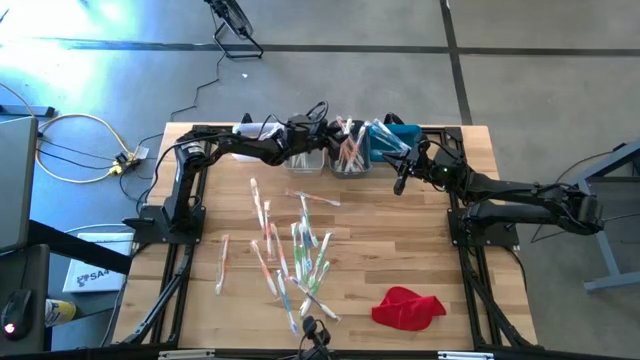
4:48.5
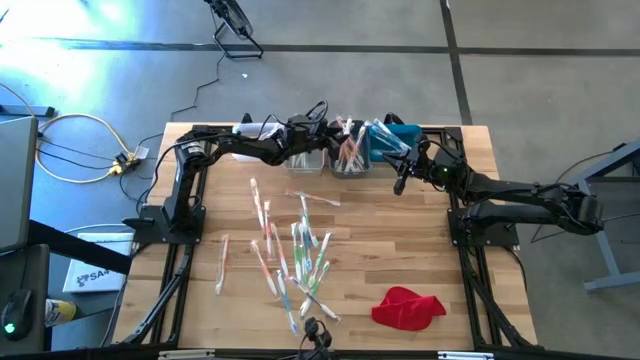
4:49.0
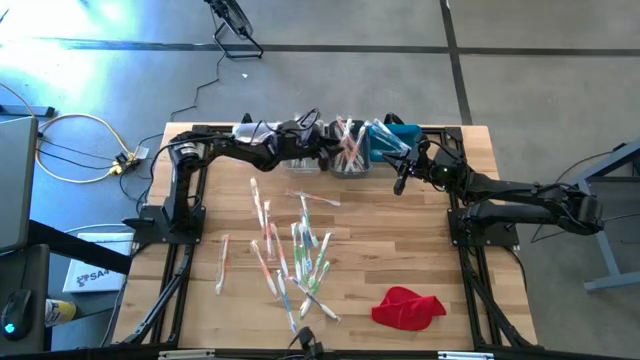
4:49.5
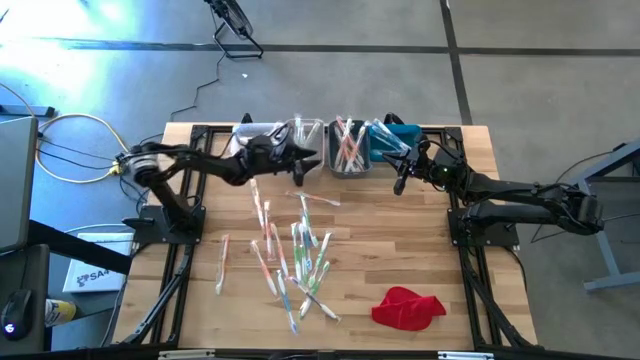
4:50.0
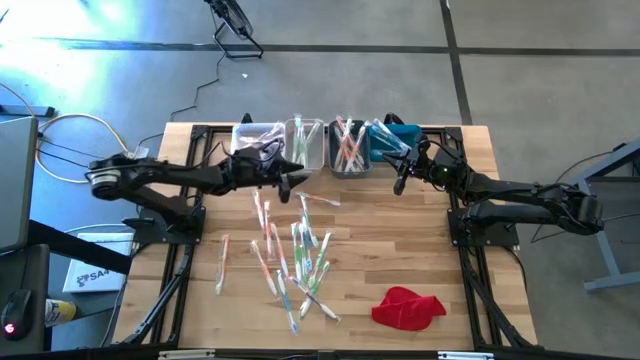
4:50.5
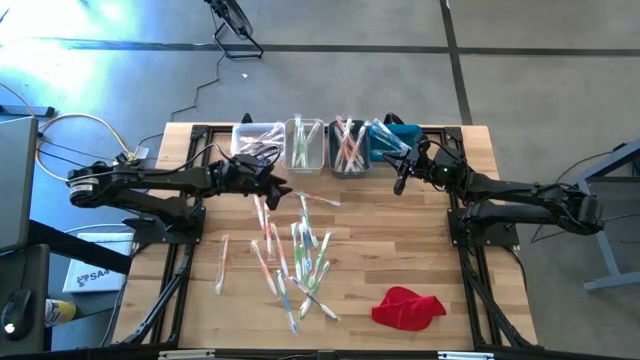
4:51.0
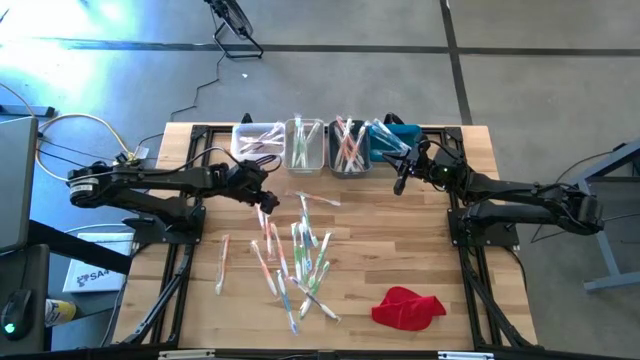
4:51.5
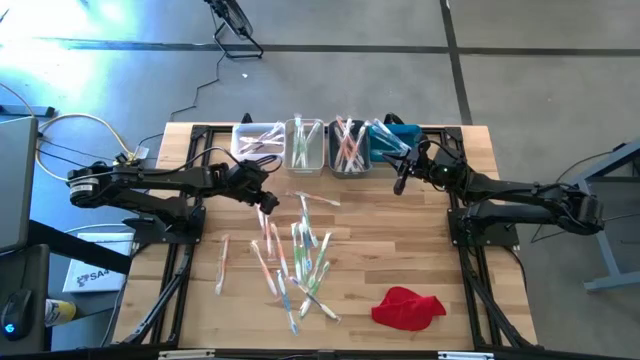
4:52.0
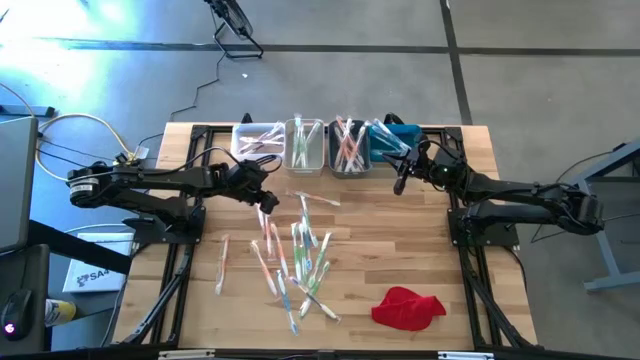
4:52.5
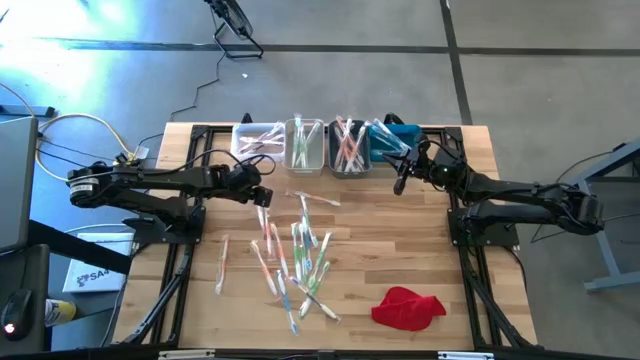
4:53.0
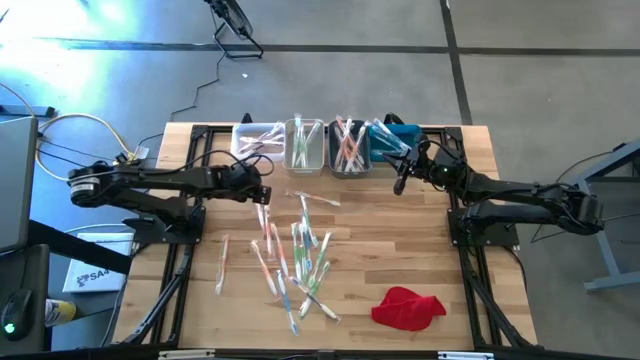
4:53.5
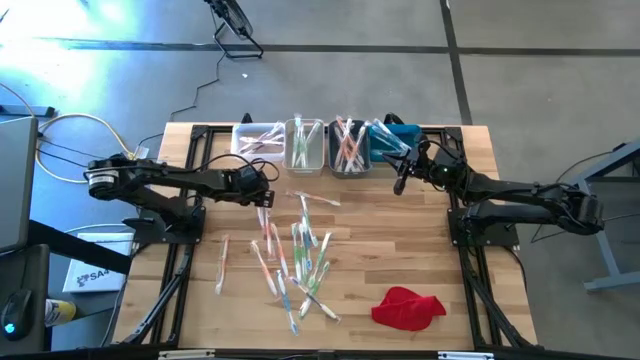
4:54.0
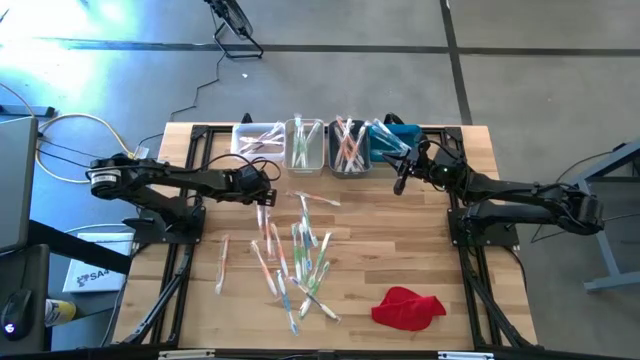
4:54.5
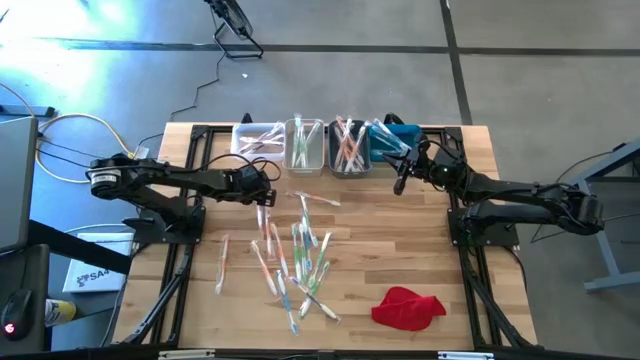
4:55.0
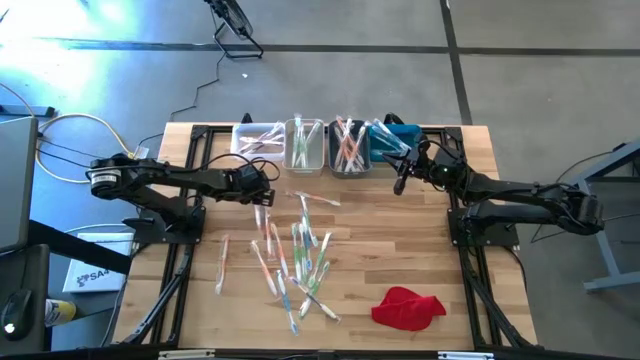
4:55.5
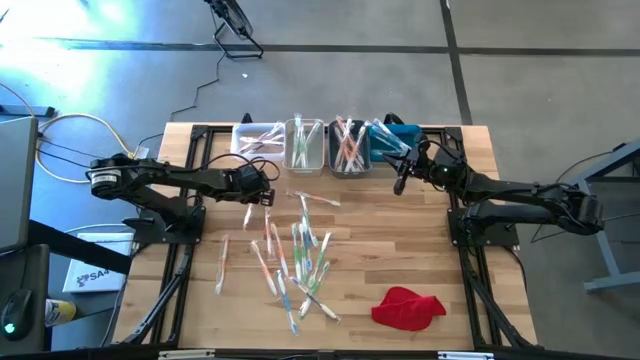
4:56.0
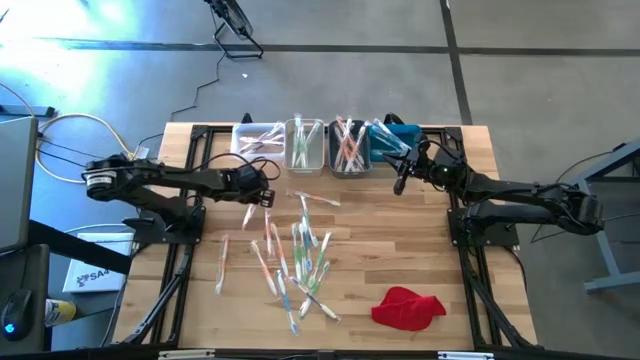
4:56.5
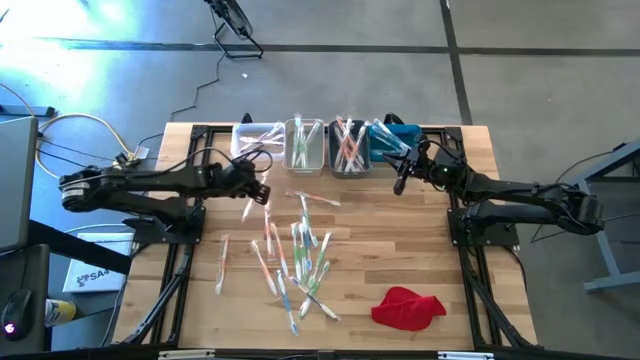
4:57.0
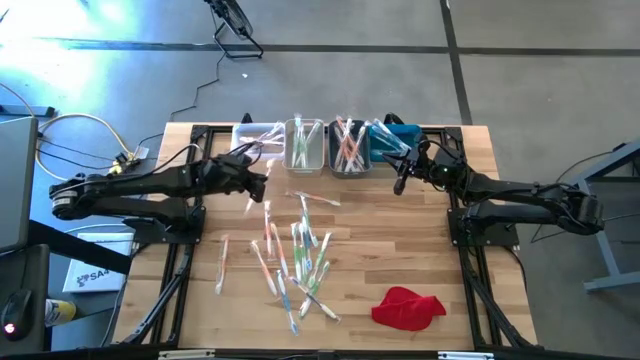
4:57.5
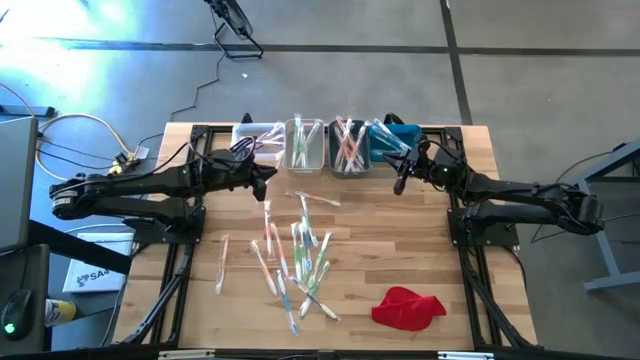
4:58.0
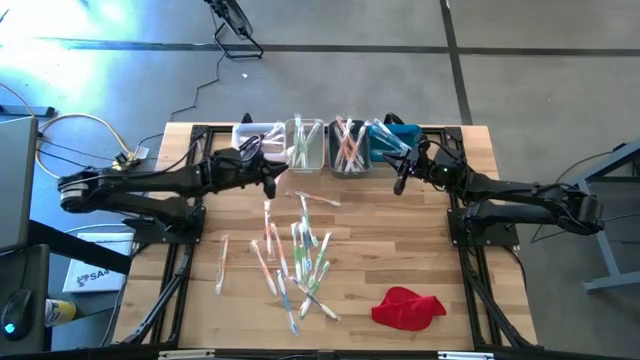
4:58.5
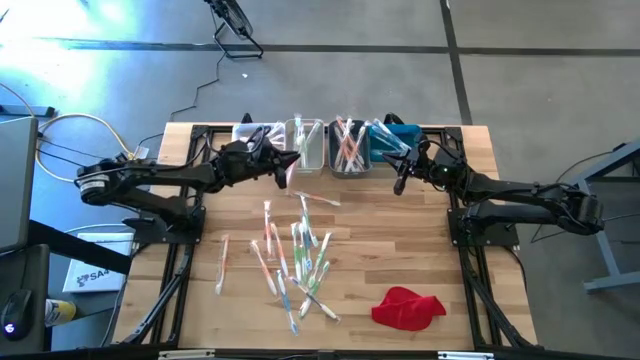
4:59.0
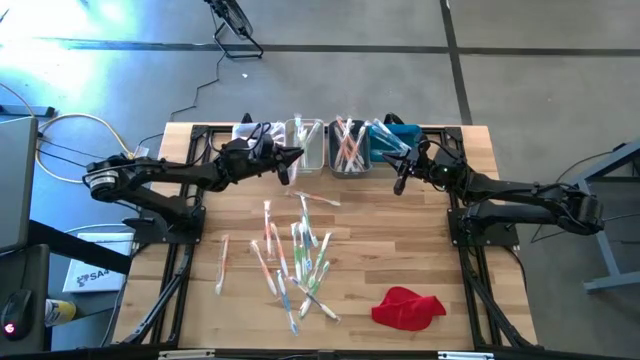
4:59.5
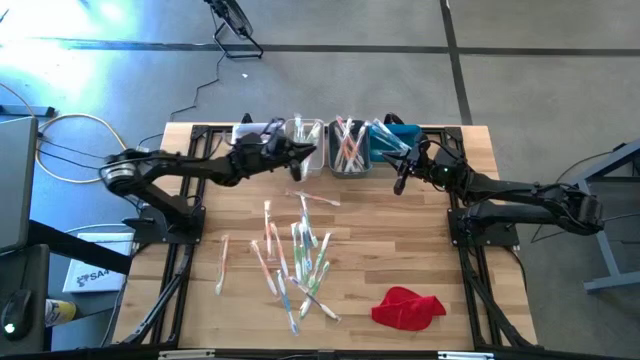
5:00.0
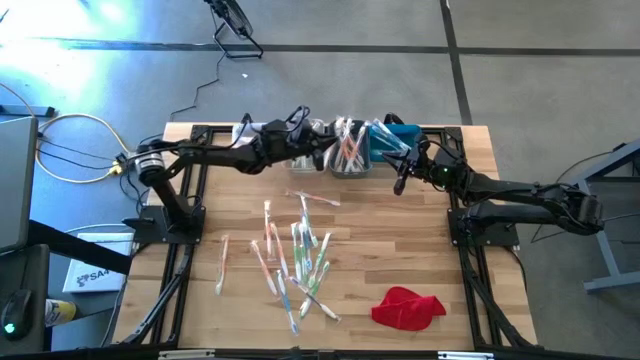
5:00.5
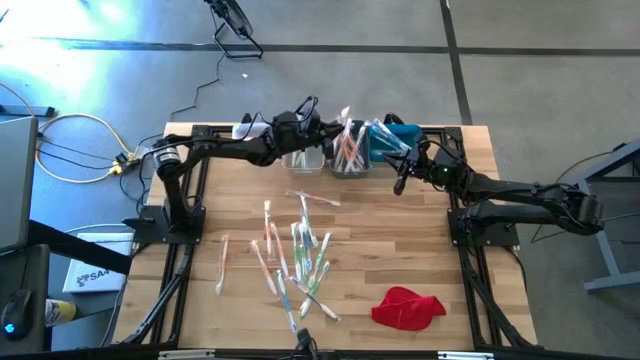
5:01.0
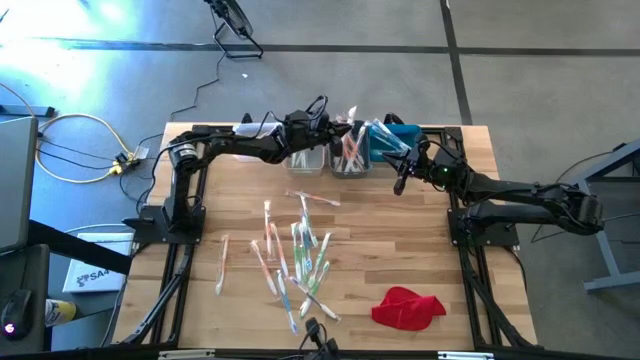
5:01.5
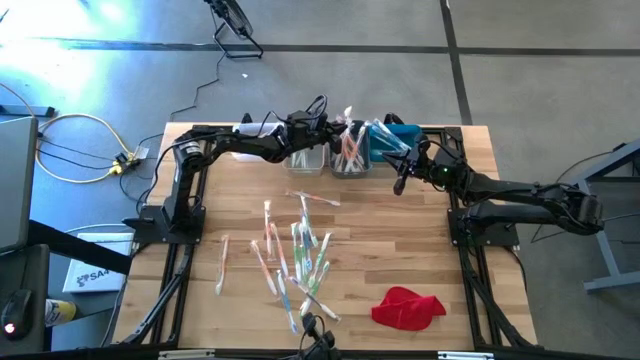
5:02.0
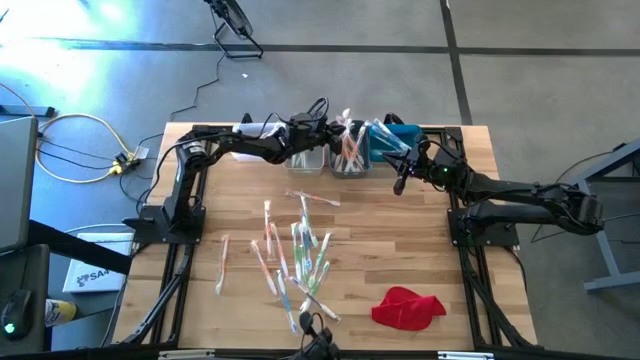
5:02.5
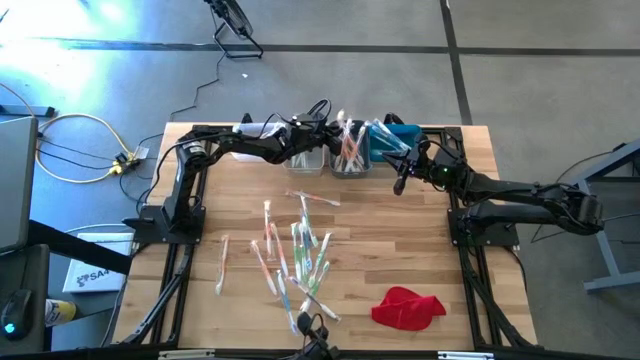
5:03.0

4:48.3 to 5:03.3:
Task: Pick & Place Toothbrushes
Put the orange toothbrush into the dark green bin

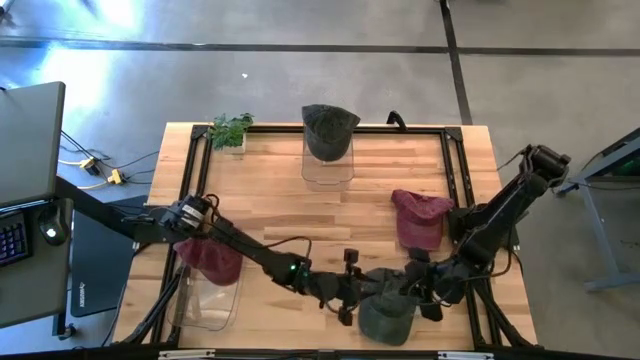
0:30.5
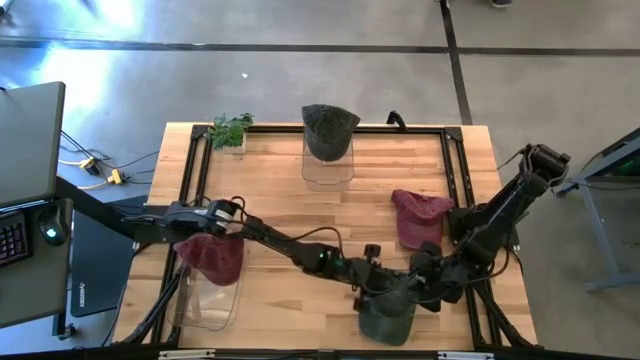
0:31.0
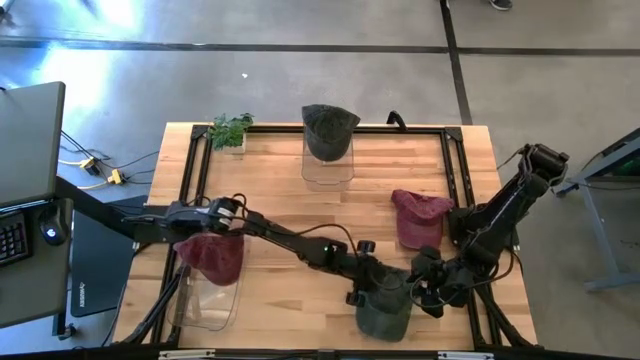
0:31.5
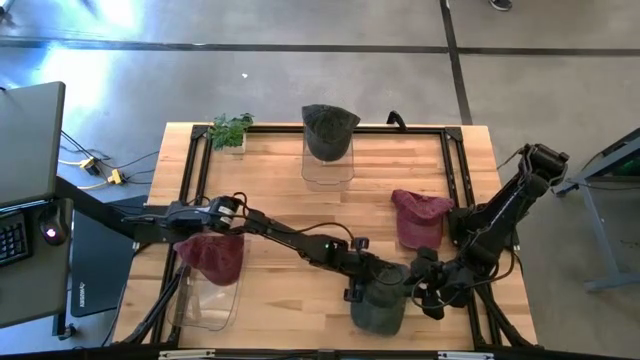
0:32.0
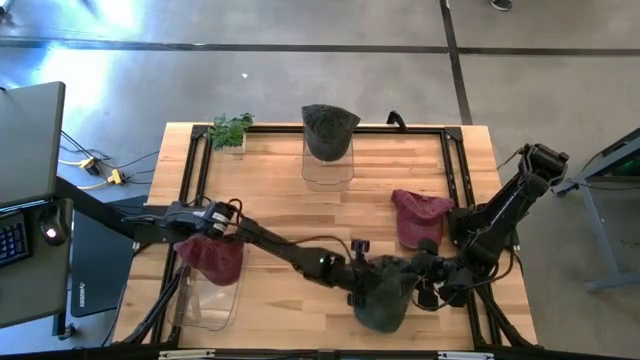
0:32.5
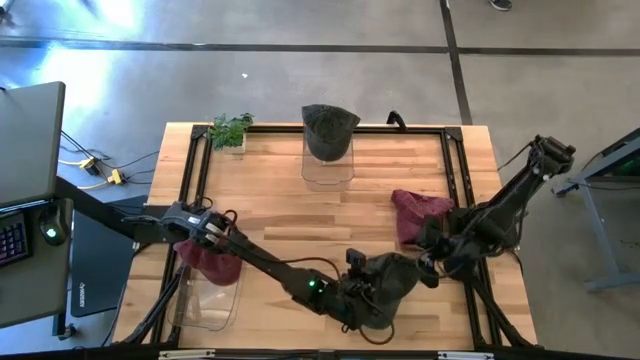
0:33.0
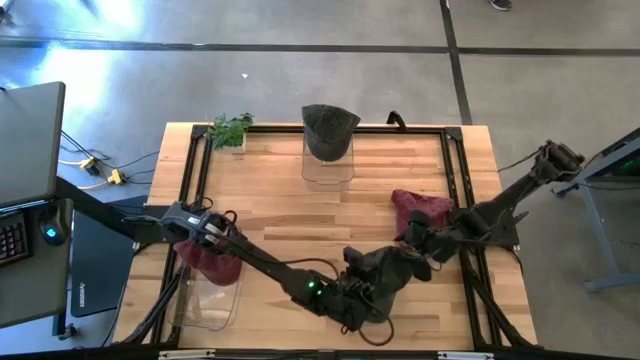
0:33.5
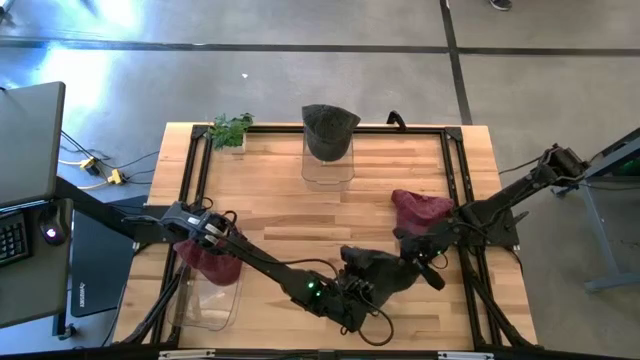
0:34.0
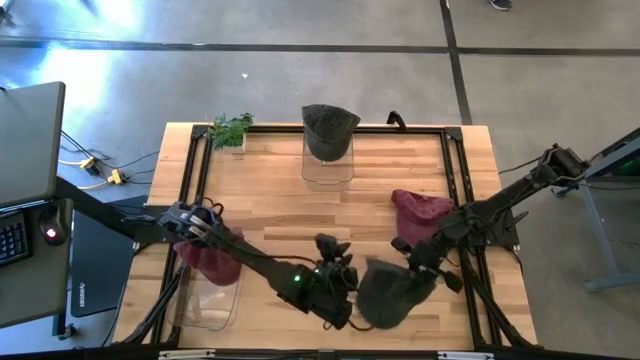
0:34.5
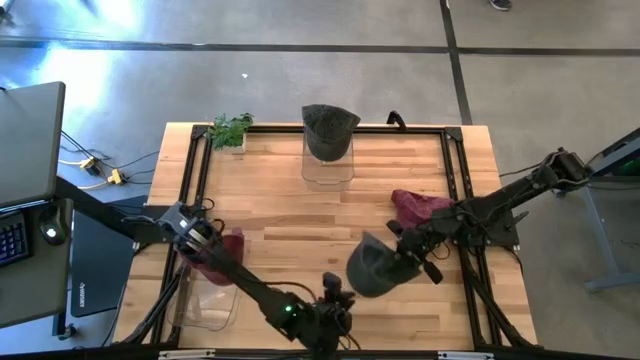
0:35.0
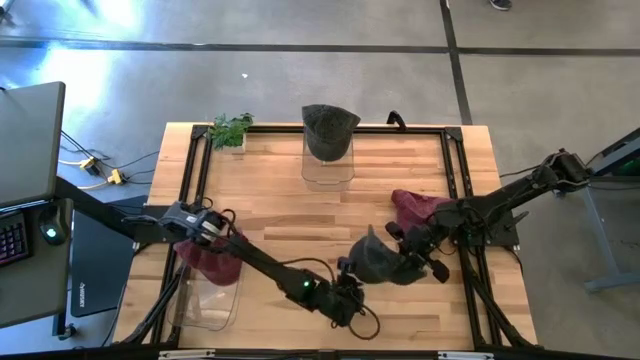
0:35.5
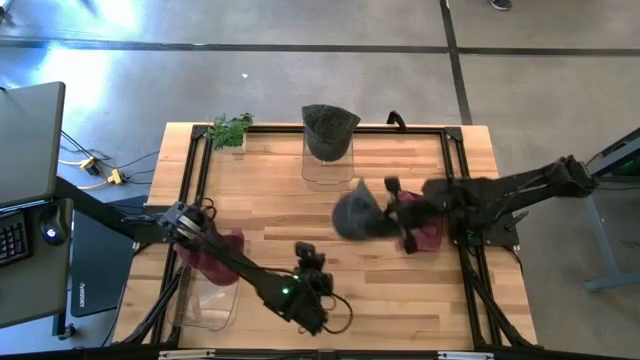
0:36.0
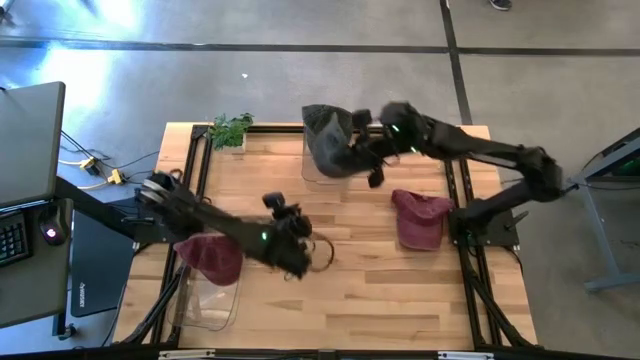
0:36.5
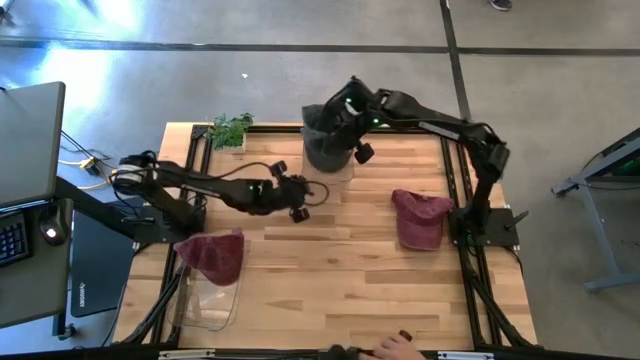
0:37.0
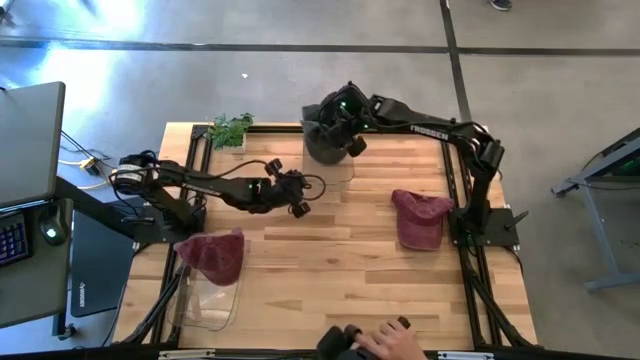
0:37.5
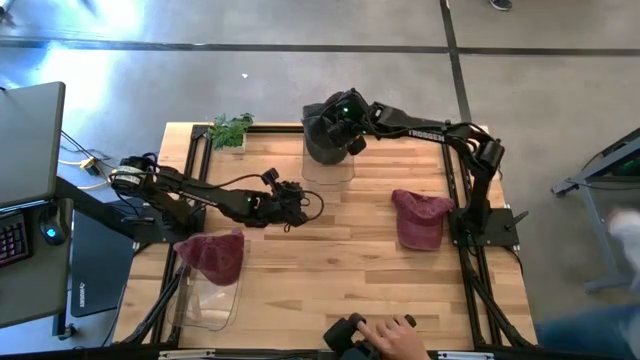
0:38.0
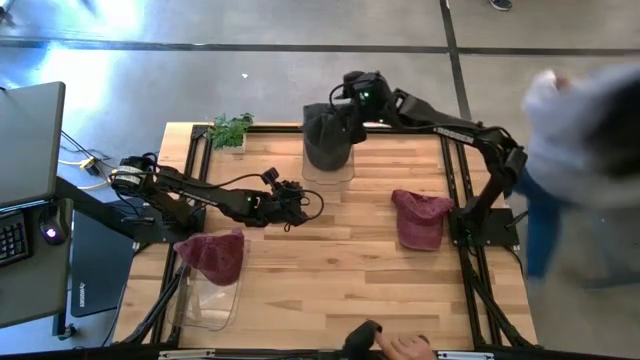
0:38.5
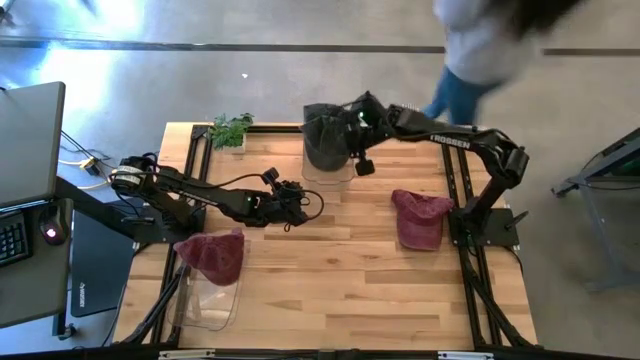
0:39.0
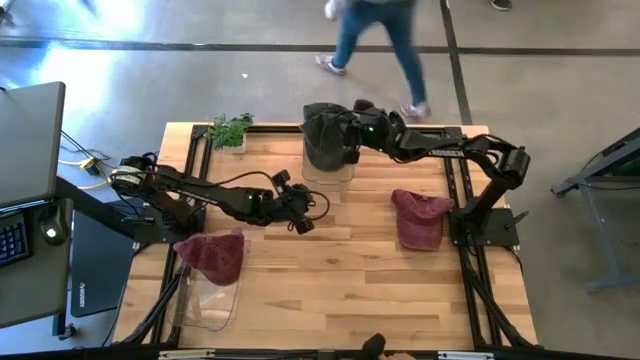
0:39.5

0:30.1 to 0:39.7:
Task: Pick & Place hat
Put the black cap into the top transparent bin
